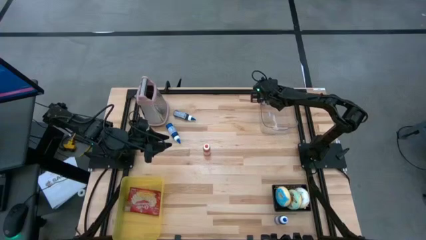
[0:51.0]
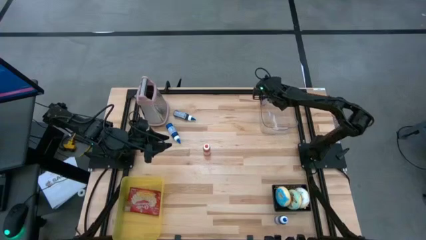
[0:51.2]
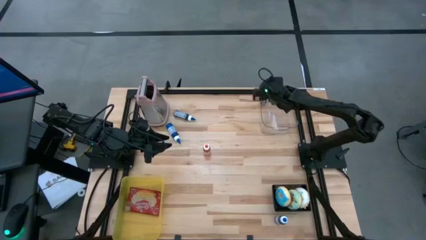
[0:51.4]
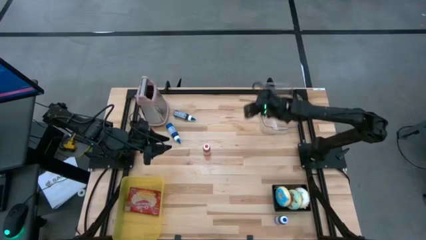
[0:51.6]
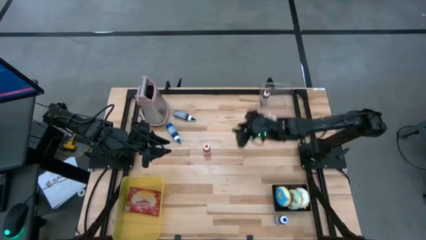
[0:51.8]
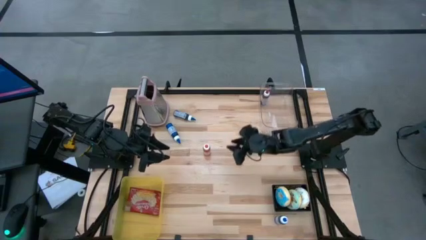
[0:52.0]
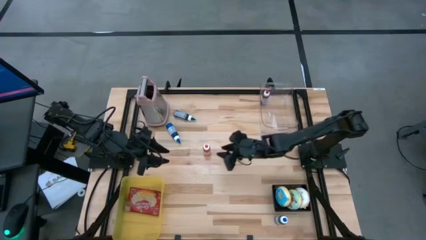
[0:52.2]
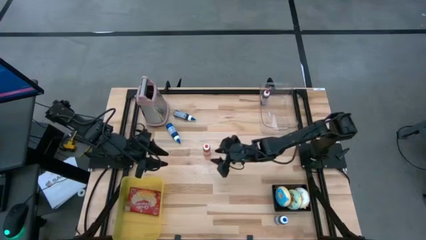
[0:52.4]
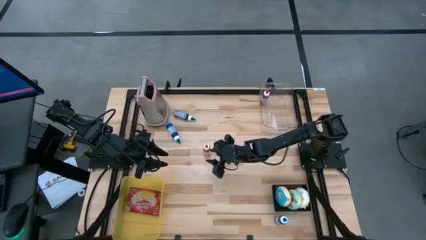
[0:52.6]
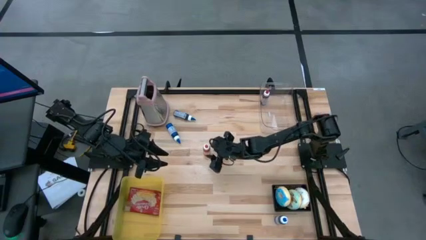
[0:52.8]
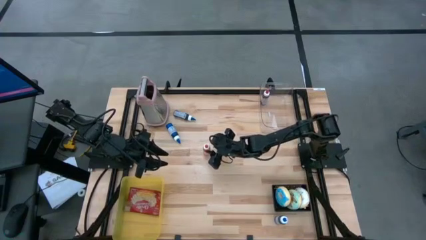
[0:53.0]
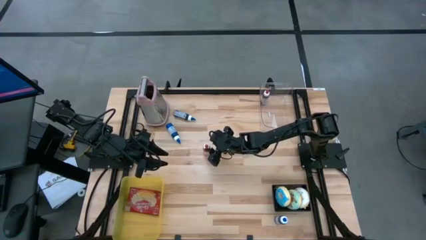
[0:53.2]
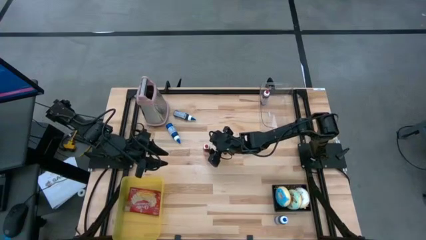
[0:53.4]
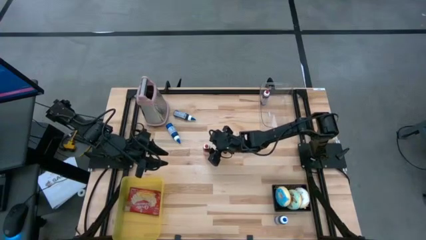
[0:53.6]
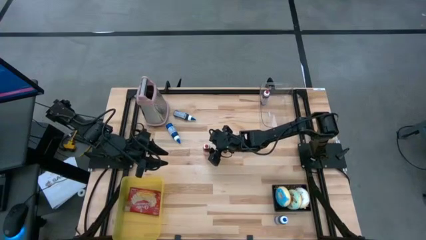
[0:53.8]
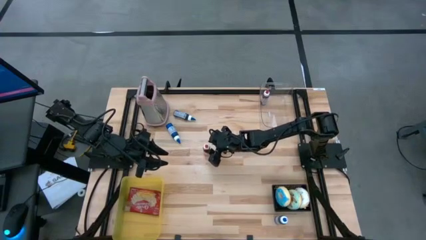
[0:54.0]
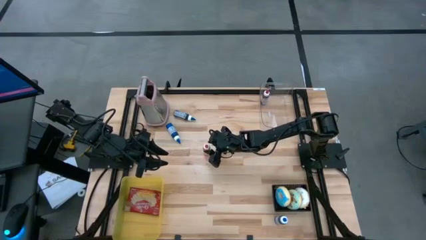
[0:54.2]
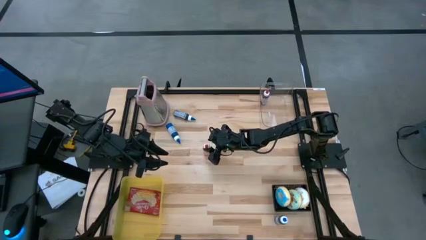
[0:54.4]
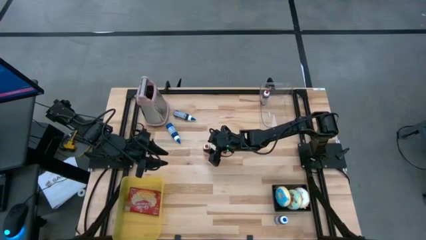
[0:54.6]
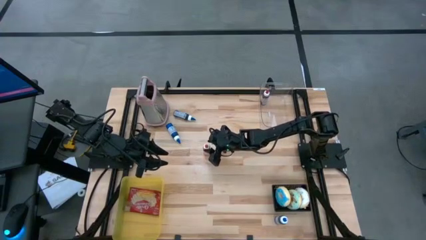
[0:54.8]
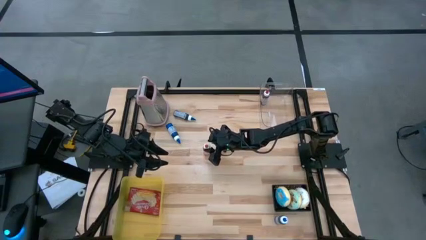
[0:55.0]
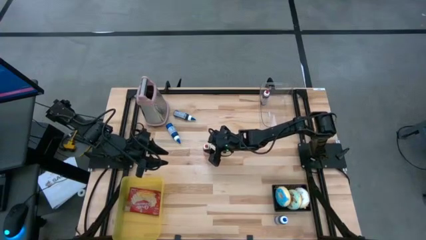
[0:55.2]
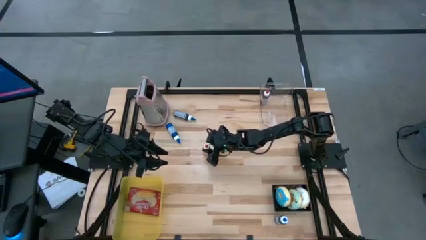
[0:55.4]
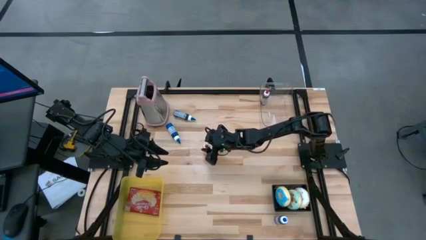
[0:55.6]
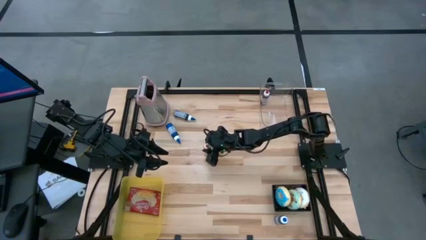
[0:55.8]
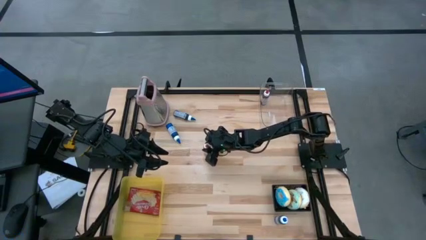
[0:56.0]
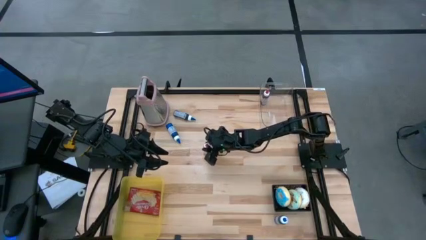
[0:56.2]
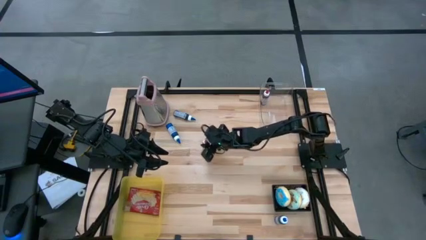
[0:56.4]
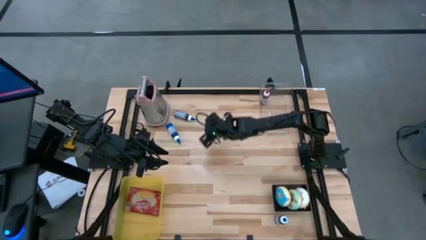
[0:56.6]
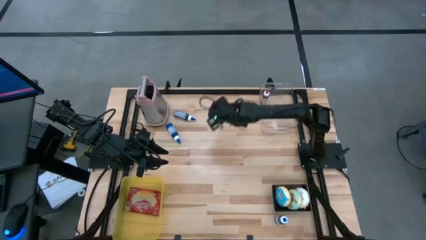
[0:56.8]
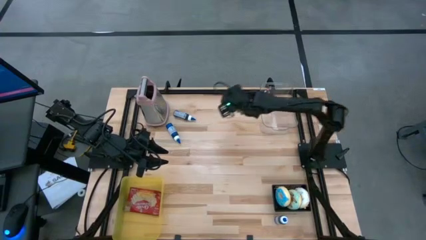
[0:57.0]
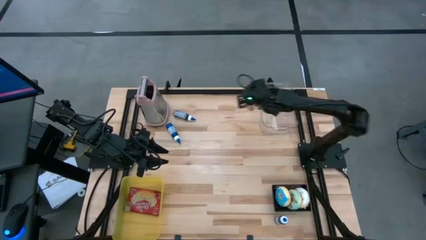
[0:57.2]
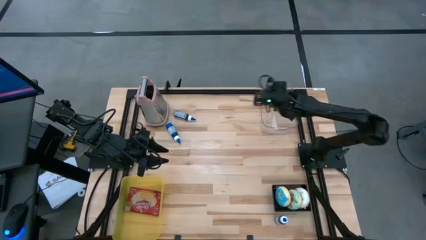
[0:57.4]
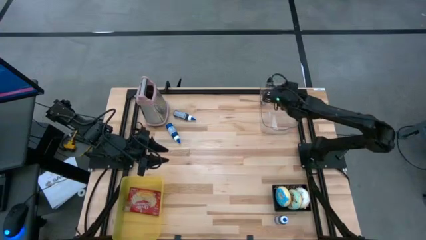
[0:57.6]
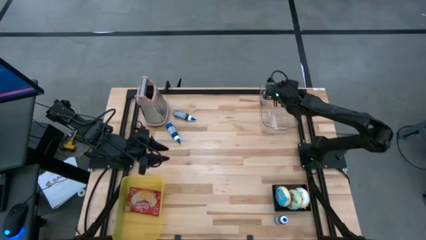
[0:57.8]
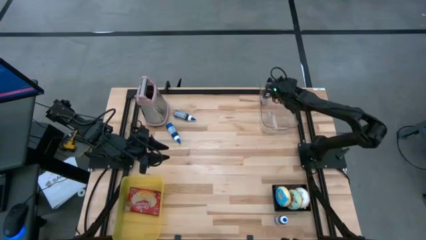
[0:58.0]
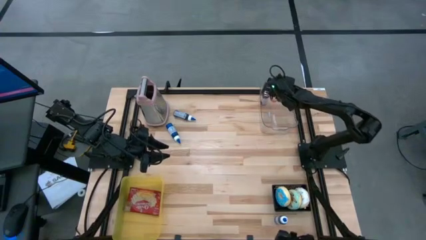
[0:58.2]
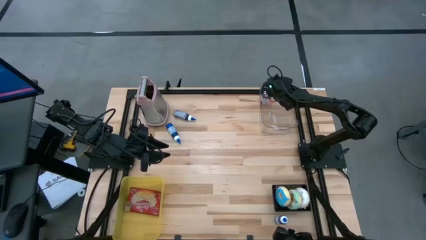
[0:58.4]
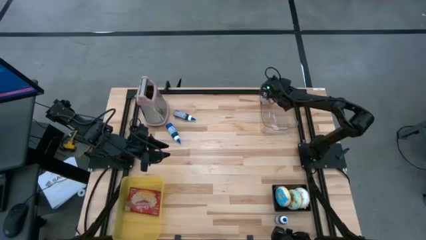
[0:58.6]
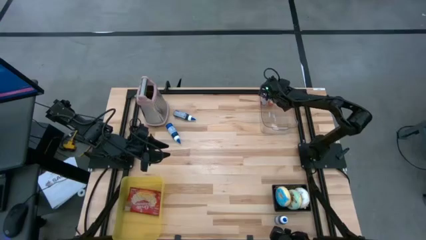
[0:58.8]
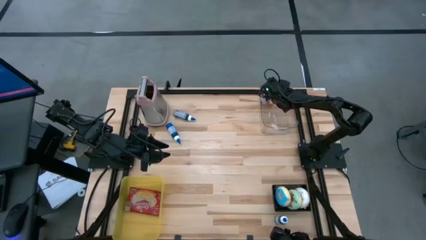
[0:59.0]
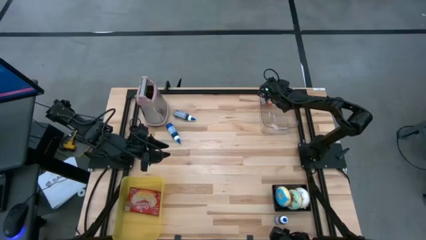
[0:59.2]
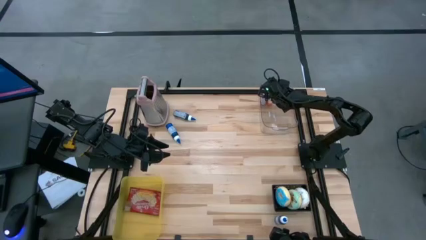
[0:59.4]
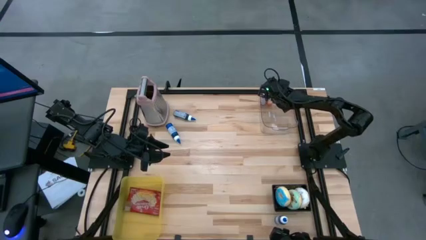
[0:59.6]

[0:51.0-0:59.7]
Put the orange food coloring bottle into the transparent bin
